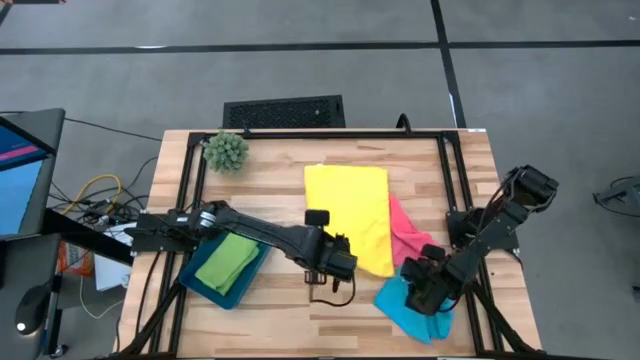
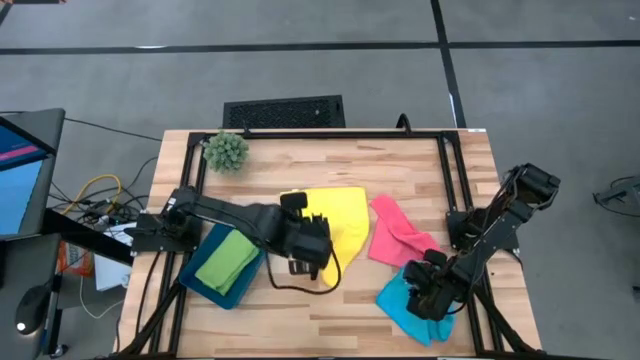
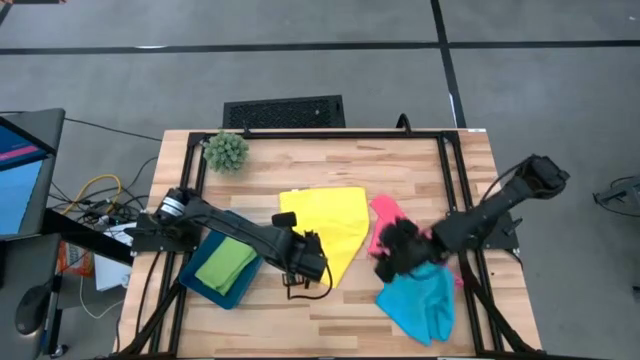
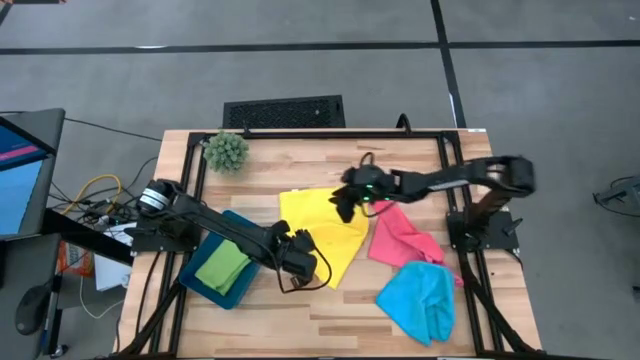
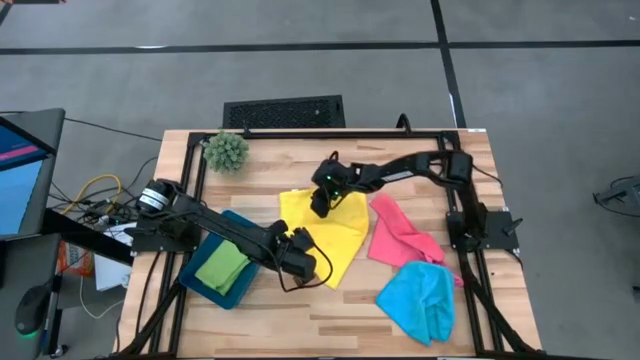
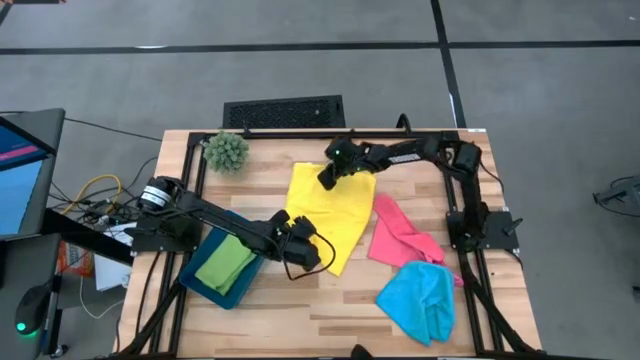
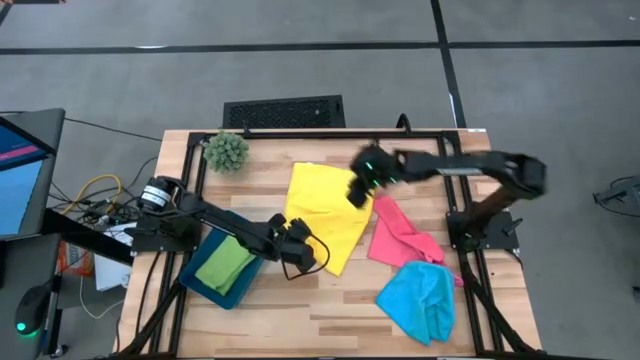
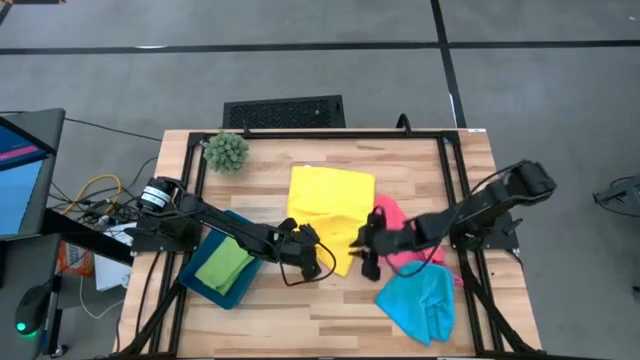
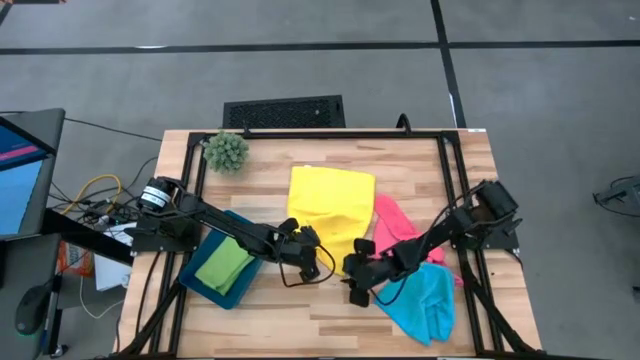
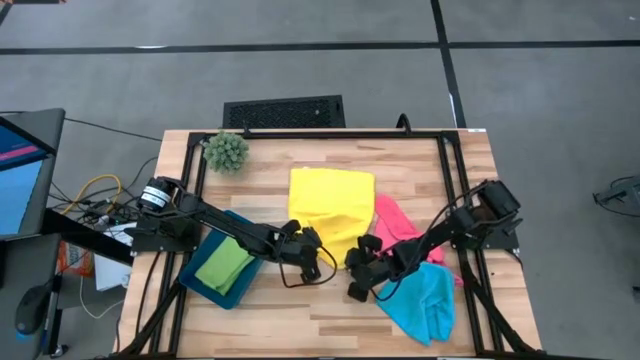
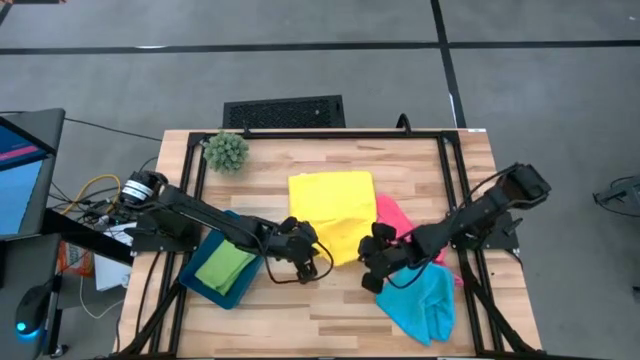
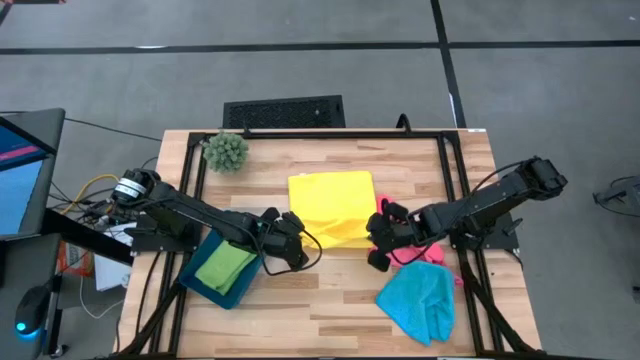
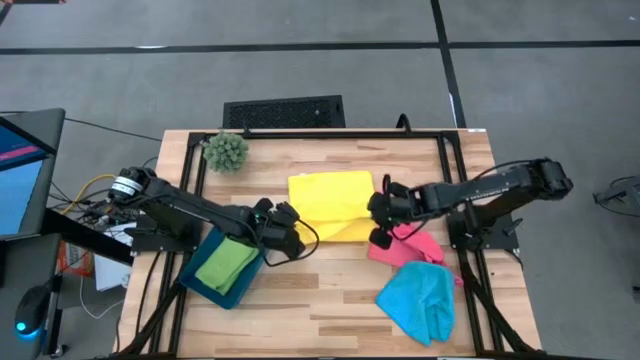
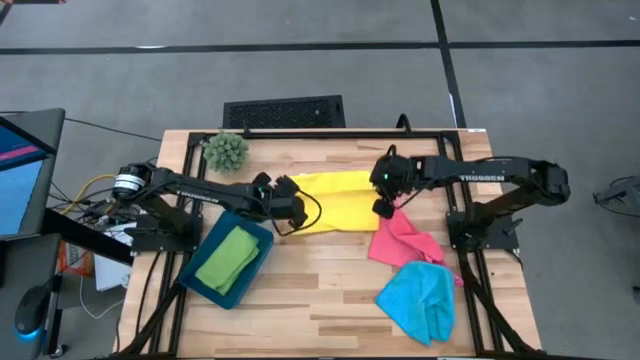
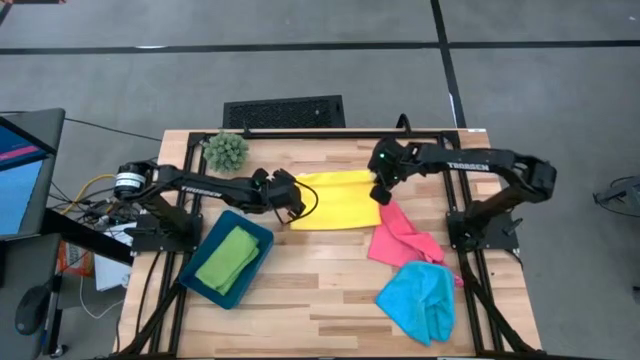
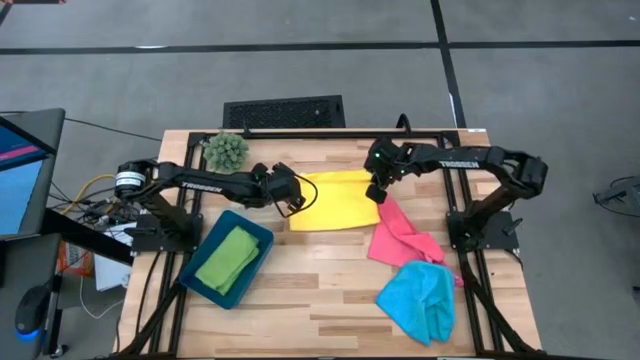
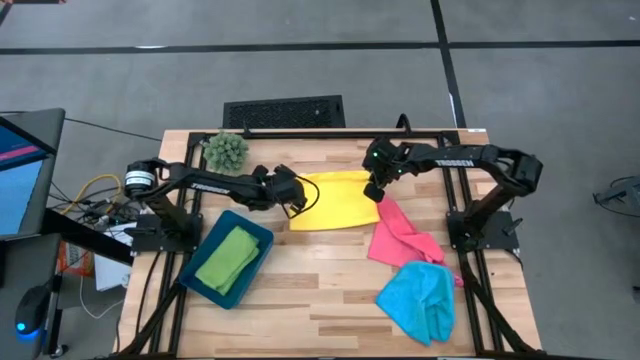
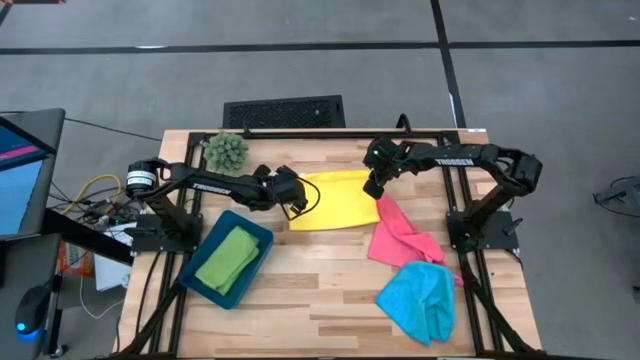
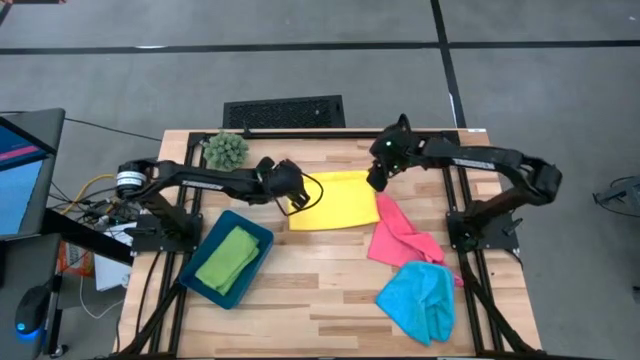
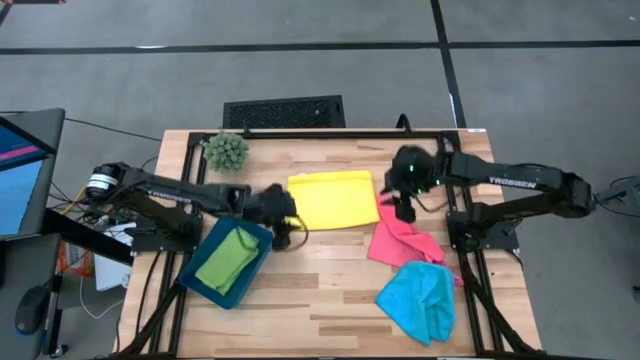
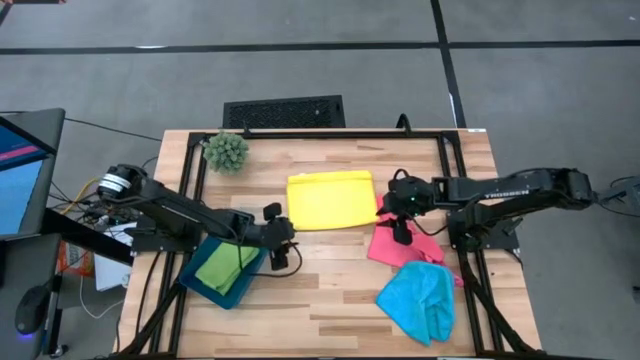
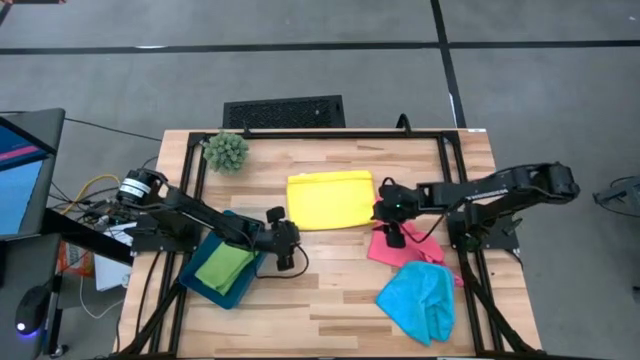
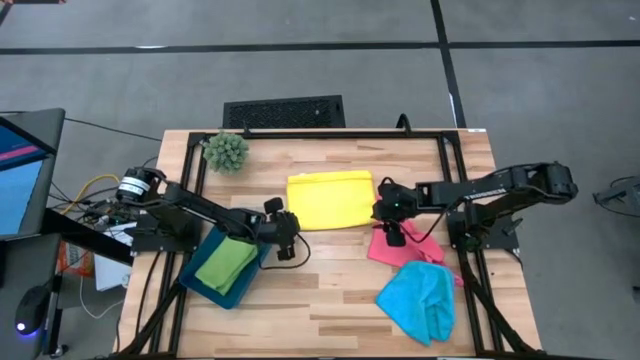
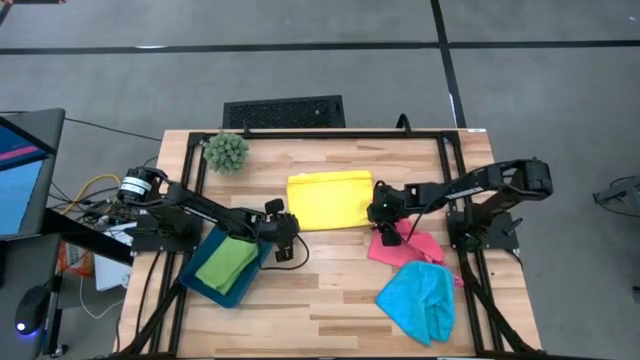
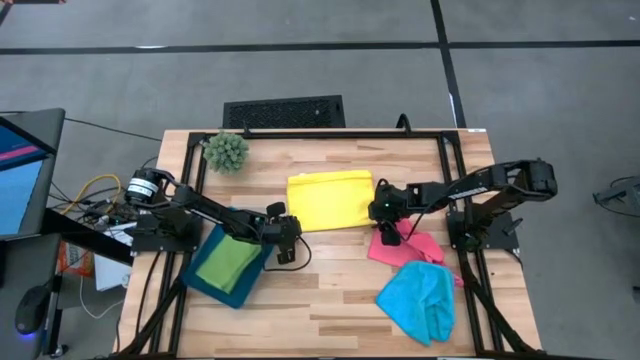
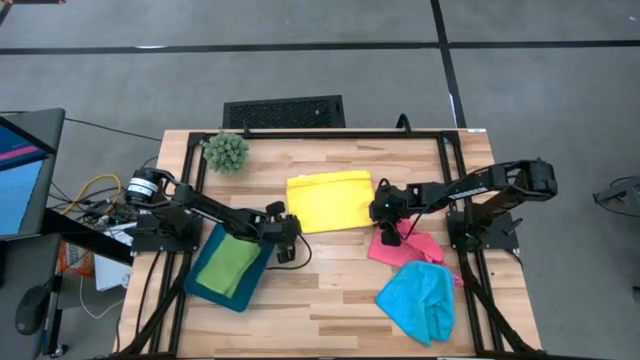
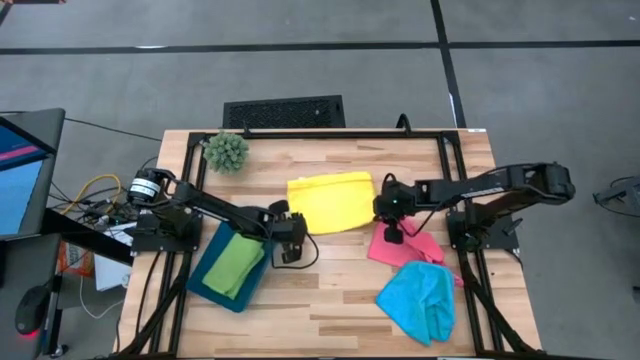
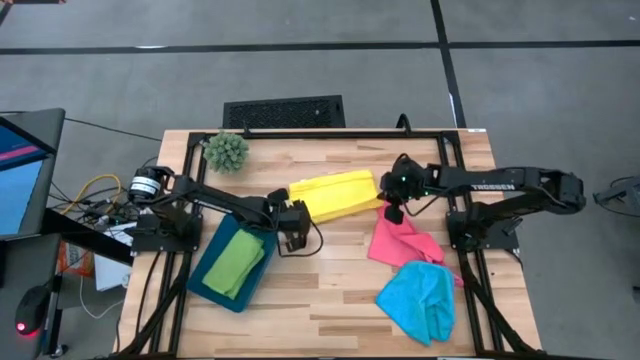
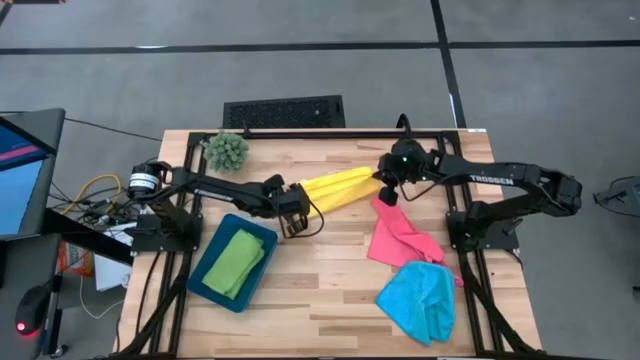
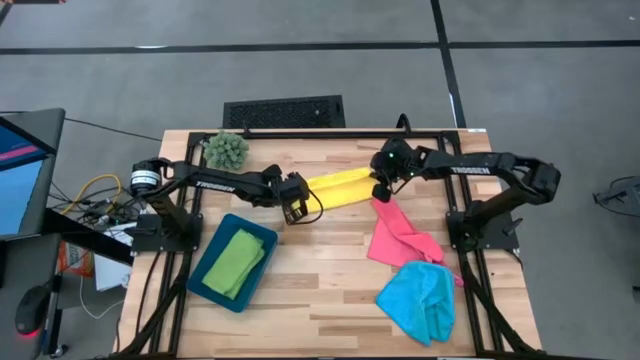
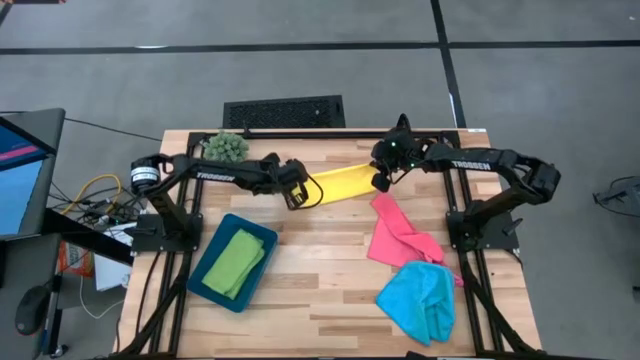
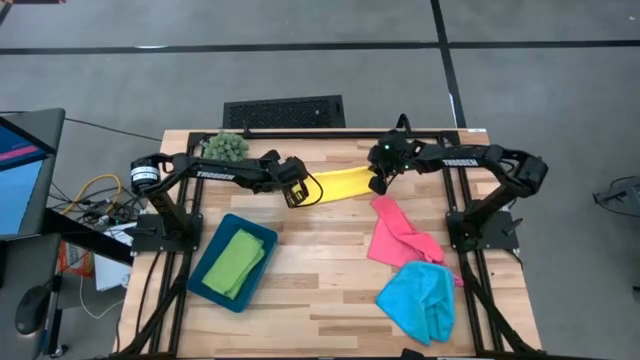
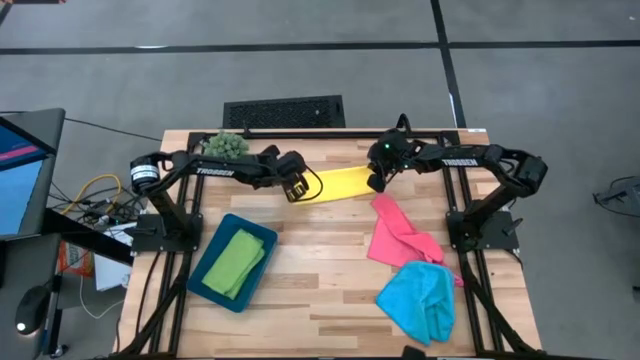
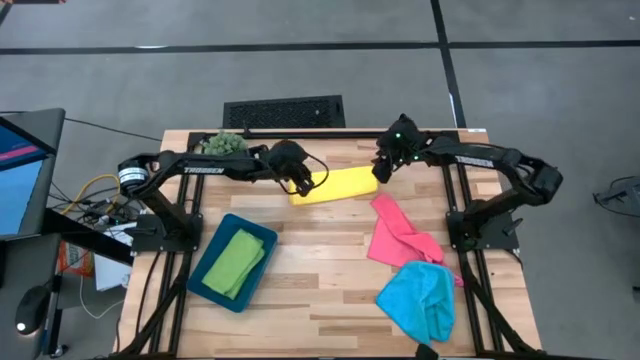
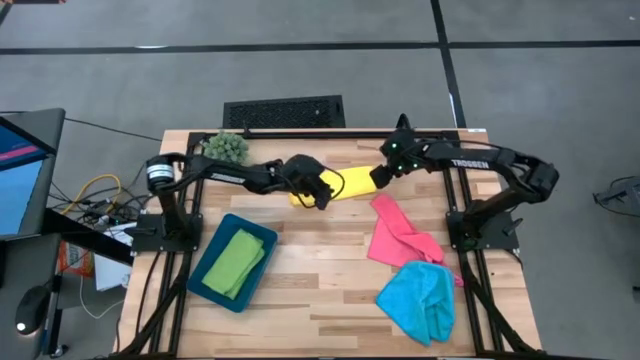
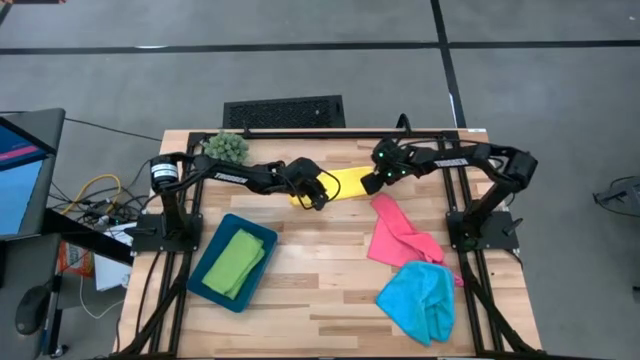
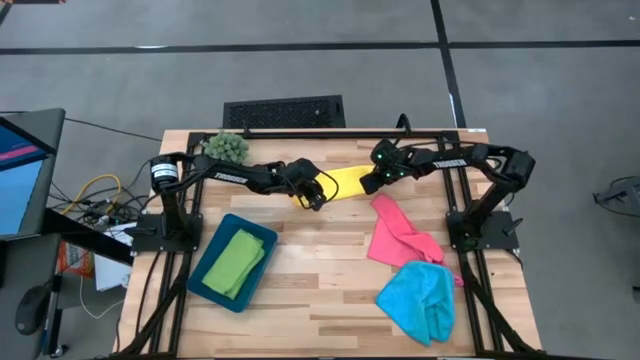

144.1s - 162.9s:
Task: Fold microfiber towels
Fold the yellow microfiber towel

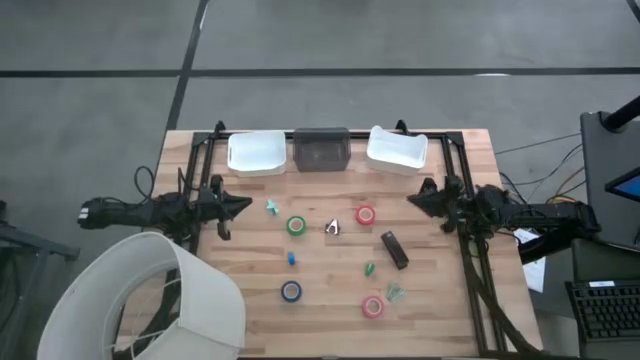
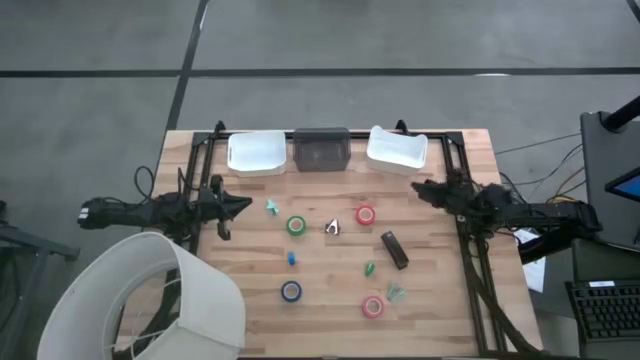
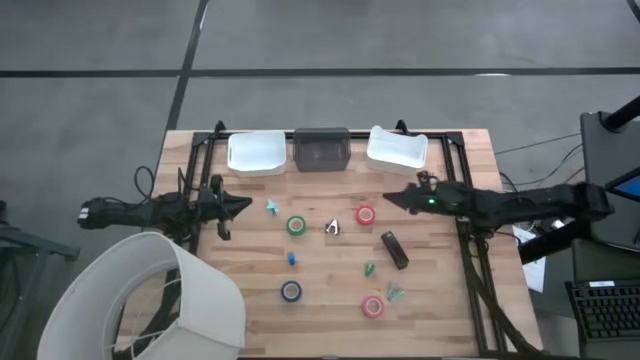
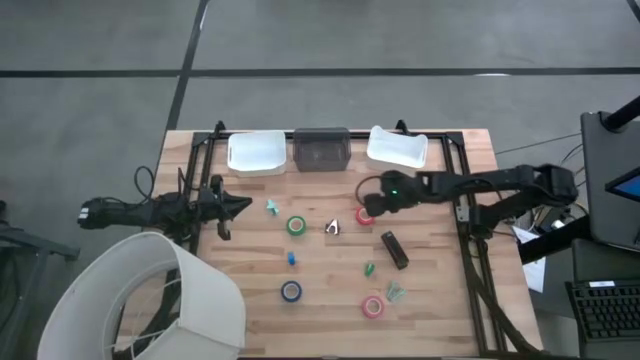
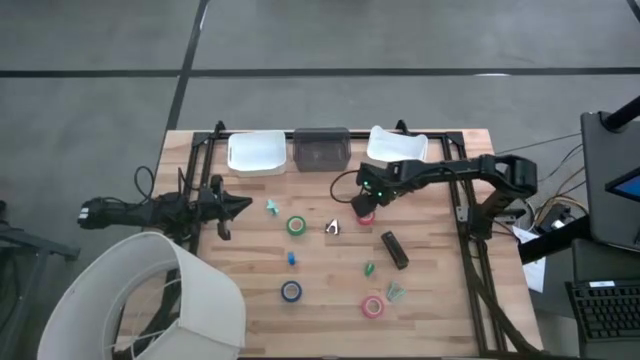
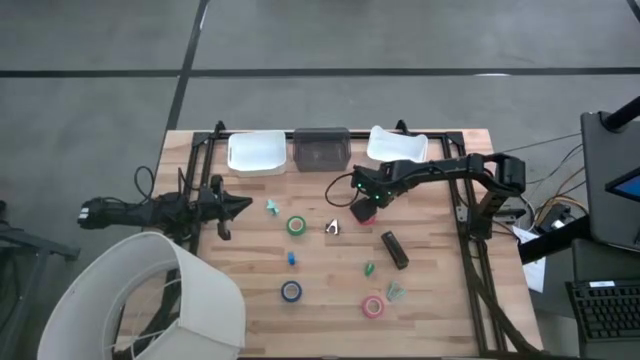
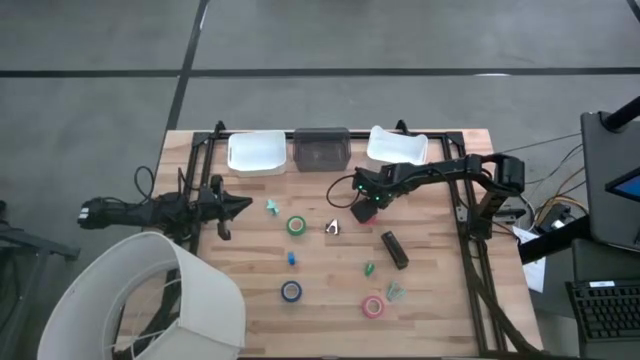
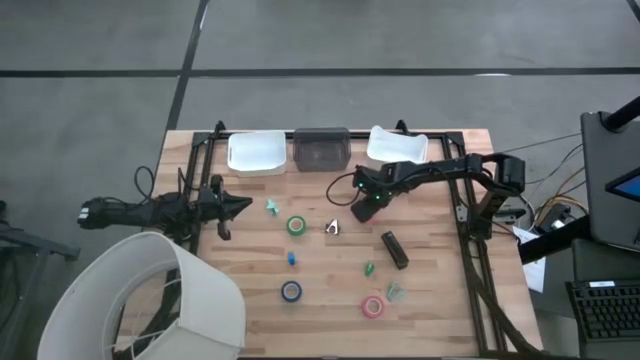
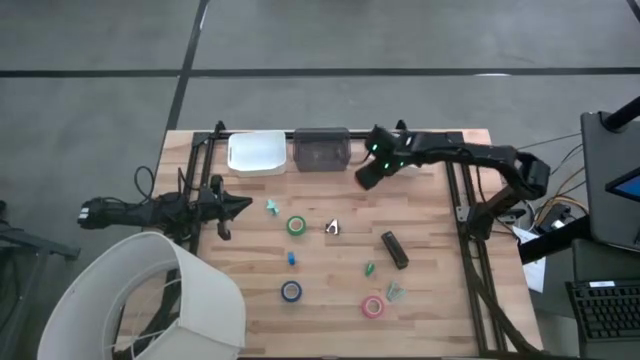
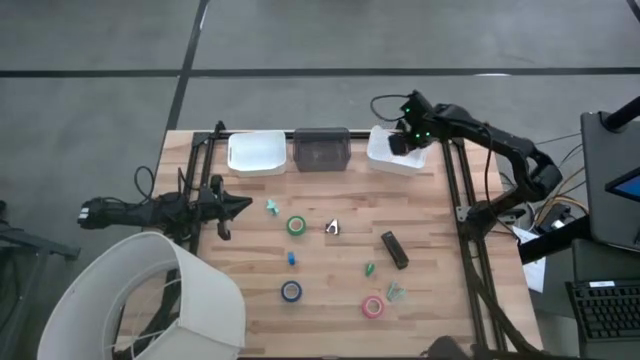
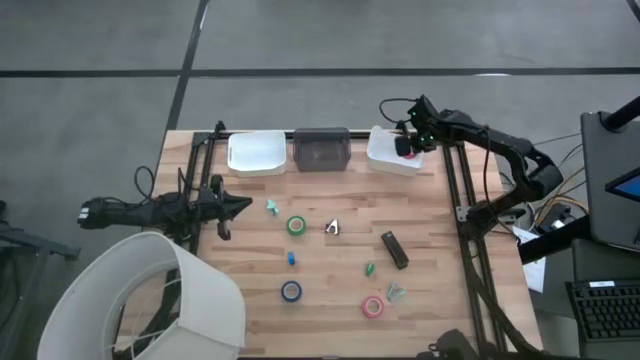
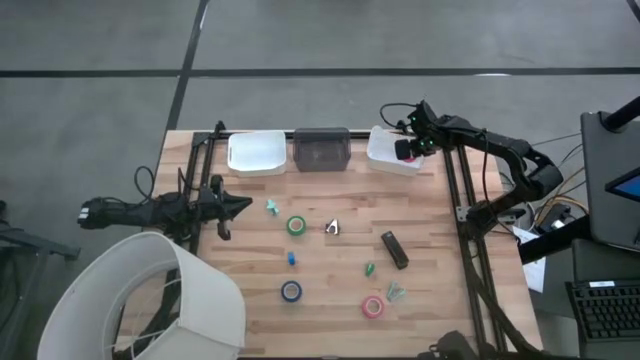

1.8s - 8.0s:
Task: Pick and place Stapler, Stapler remover, tape
Put the red tape into the right white bin
